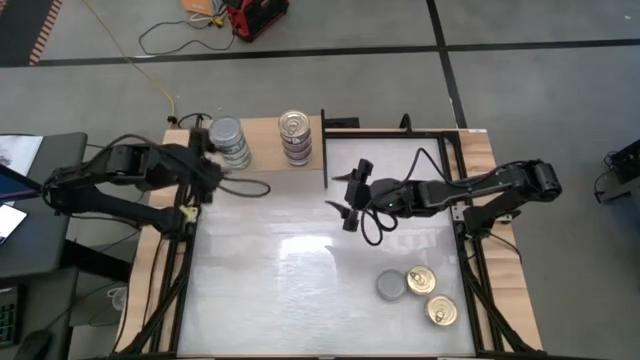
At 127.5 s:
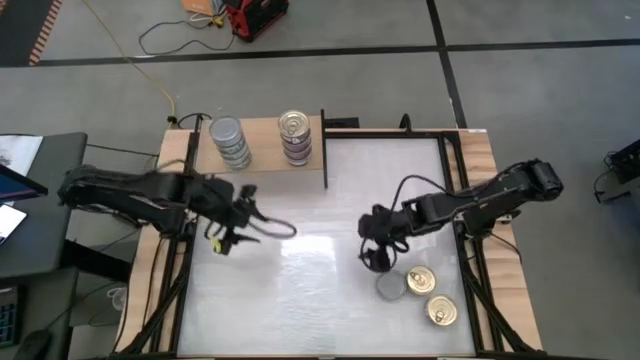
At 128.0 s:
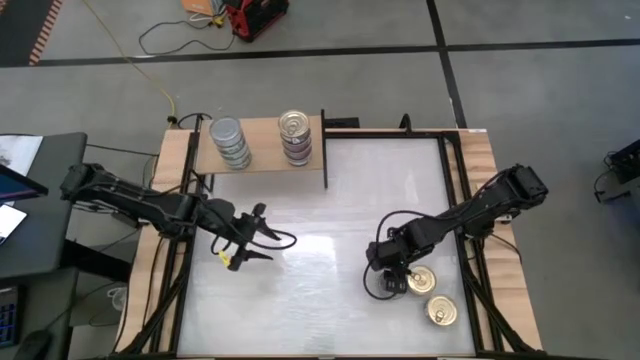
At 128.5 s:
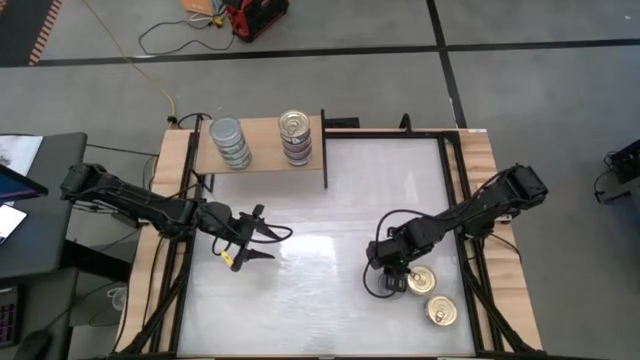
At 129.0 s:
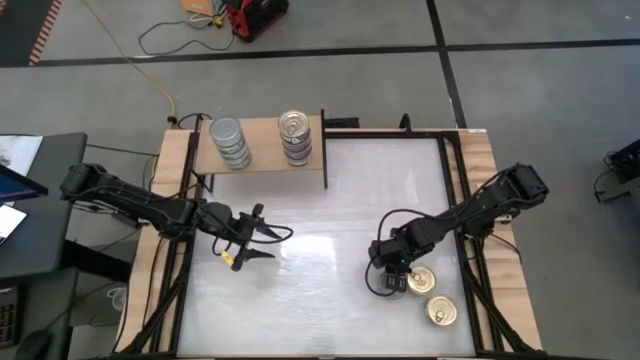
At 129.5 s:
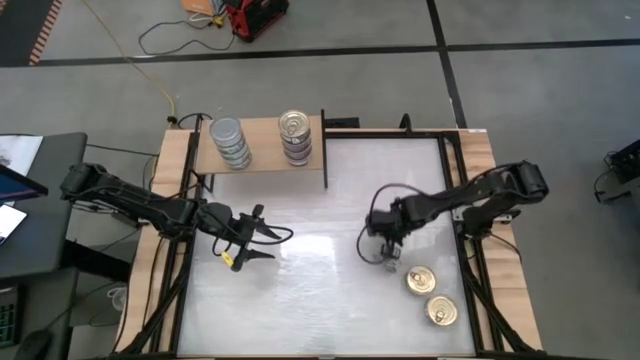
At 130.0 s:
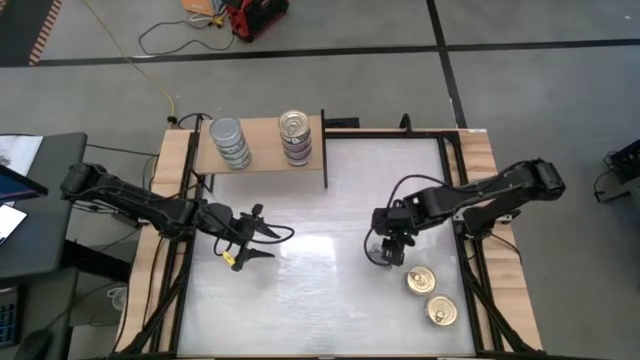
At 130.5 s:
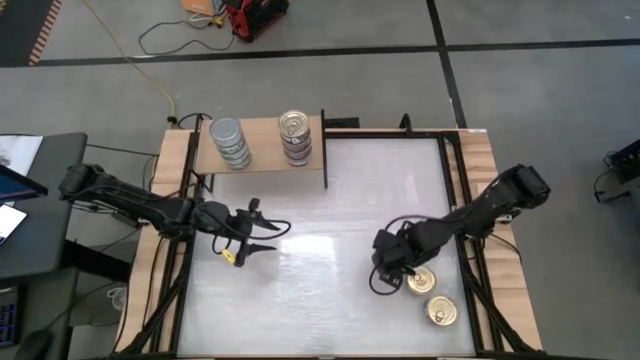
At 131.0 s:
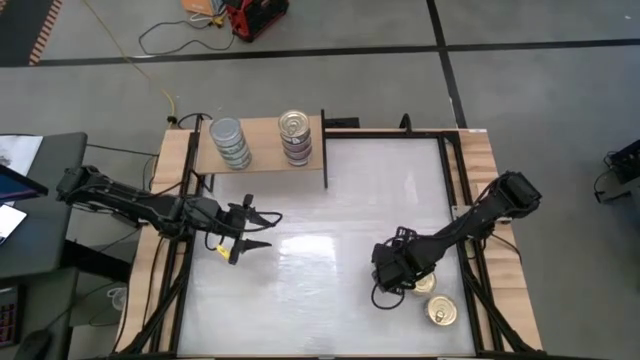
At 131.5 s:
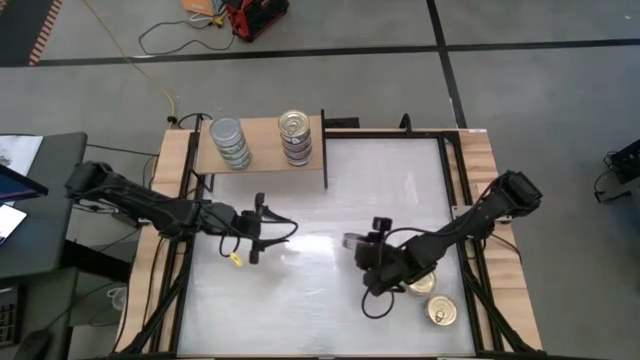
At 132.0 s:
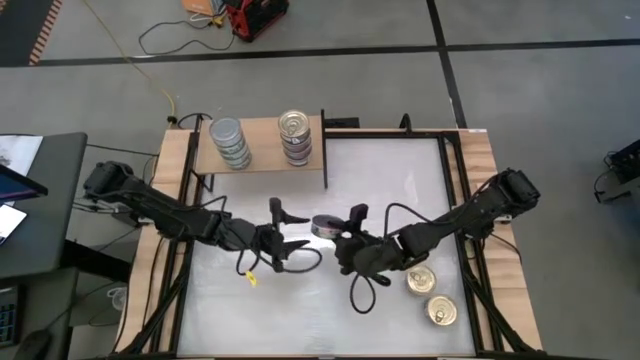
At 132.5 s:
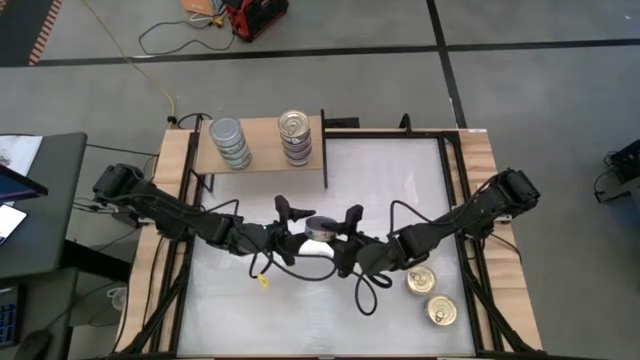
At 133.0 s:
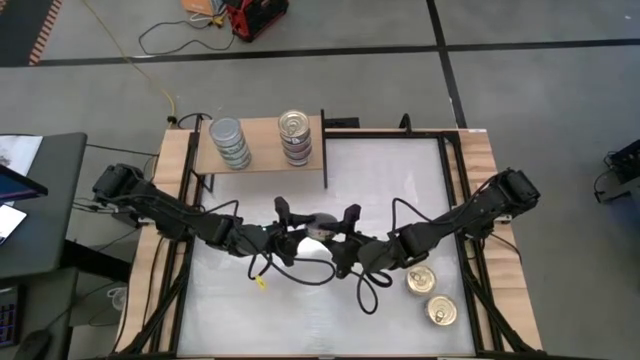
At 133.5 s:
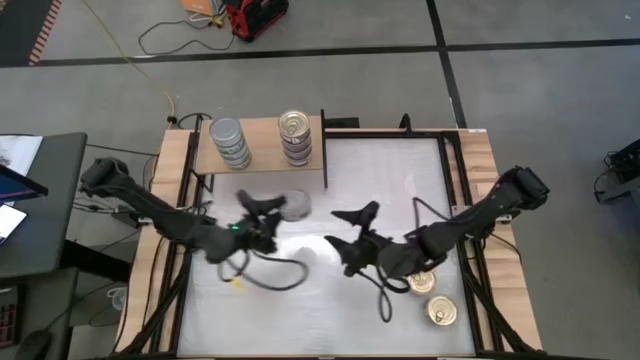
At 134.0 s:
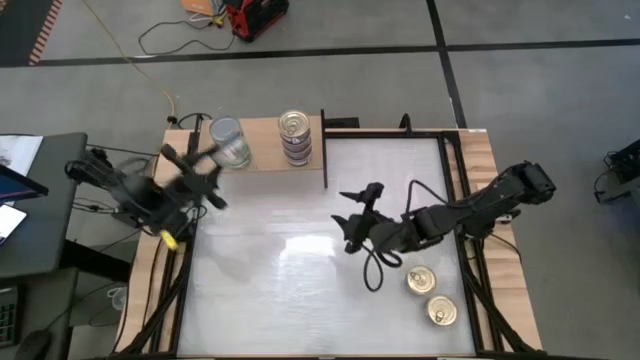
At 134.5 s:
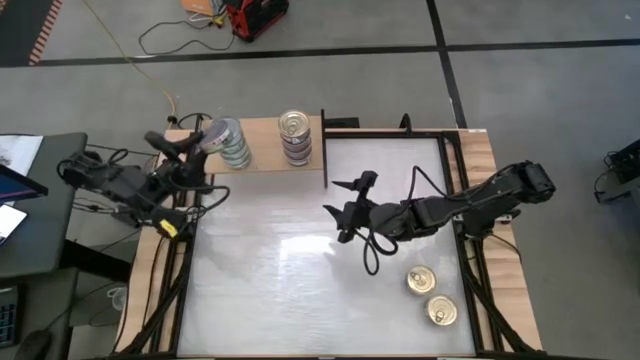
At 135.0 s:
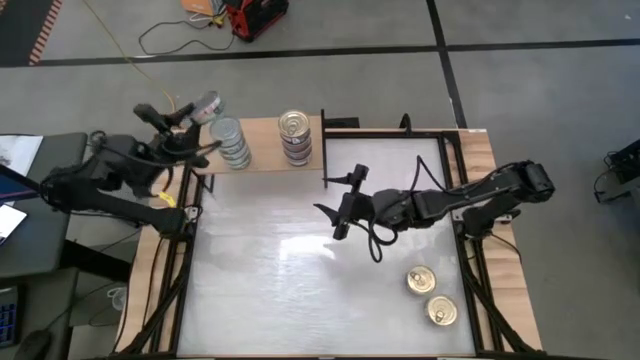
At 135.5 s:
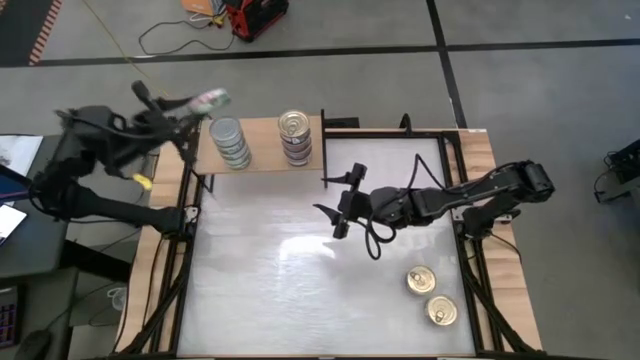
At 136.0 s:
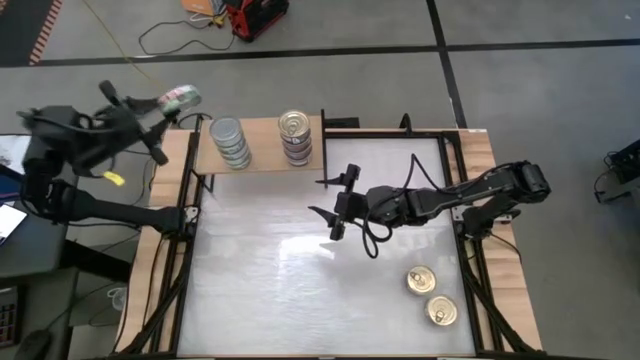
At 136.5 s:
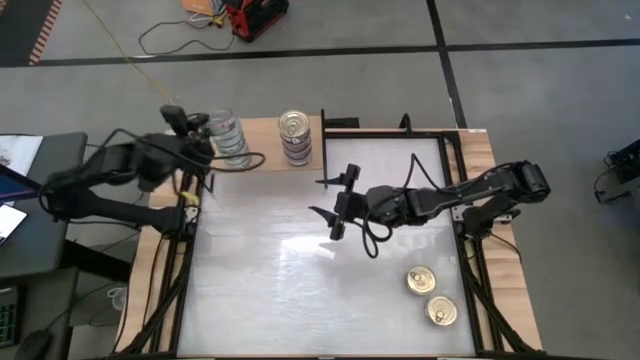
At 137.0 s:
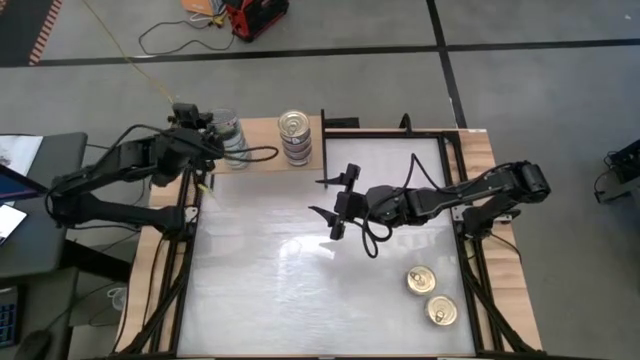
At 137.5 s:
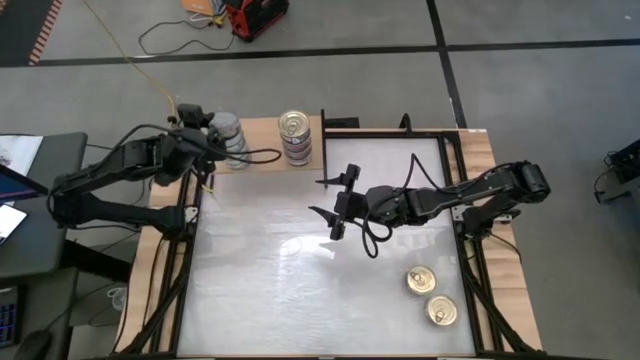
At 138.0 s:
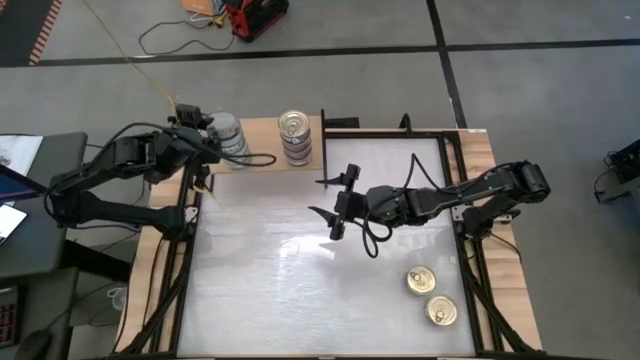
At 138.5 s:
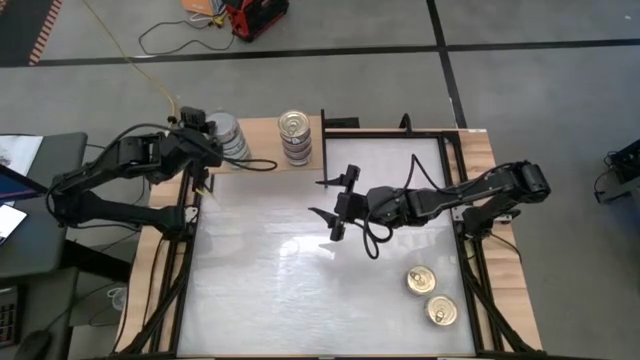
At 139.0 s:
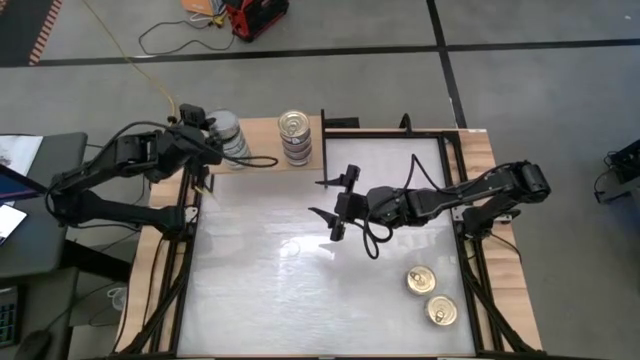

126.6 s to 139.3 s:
Task: Stack canned seafood by type on shelf
Stack the green-white tuna can on top of the other green-white tuna cans on the shelf

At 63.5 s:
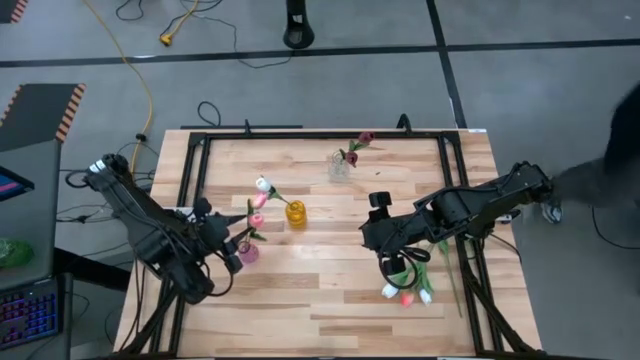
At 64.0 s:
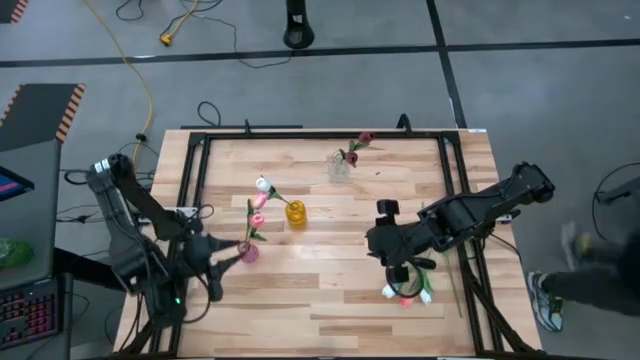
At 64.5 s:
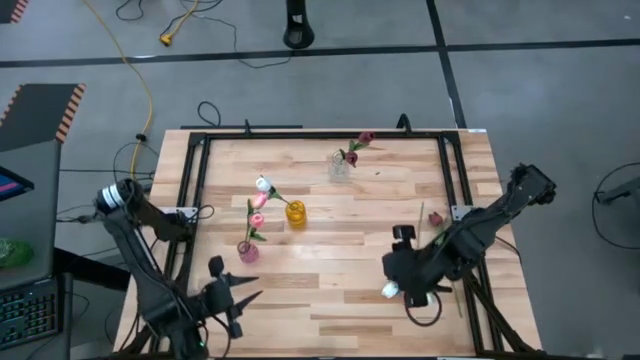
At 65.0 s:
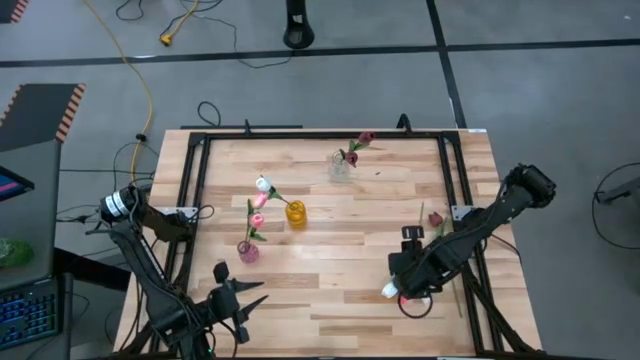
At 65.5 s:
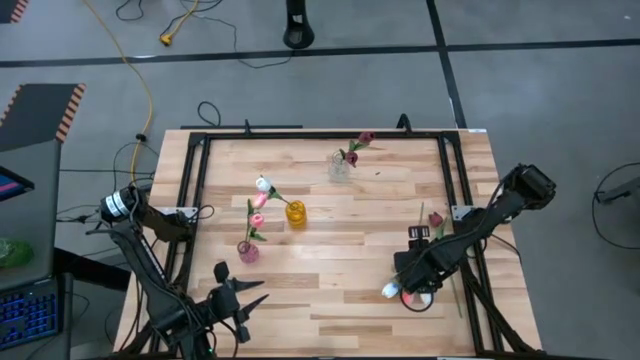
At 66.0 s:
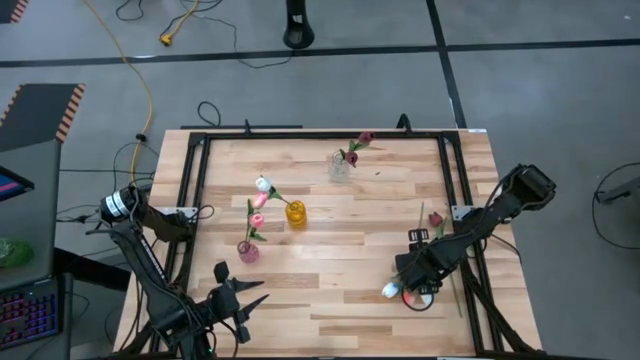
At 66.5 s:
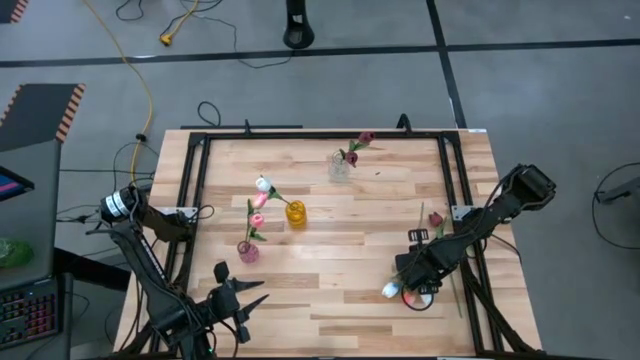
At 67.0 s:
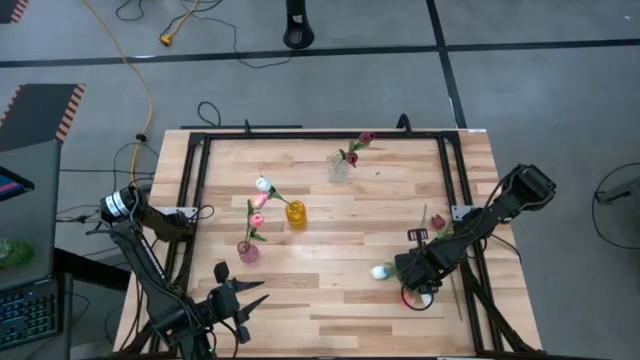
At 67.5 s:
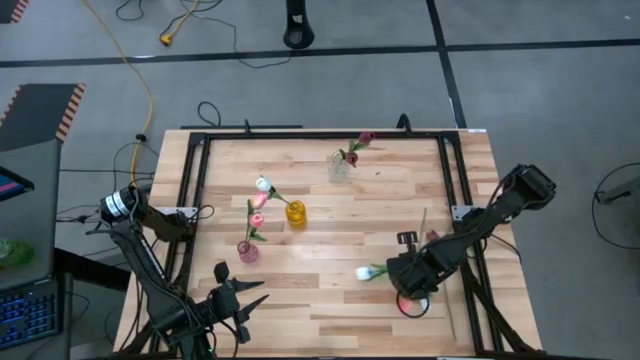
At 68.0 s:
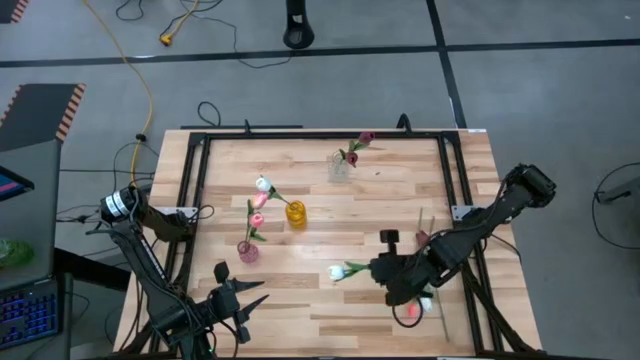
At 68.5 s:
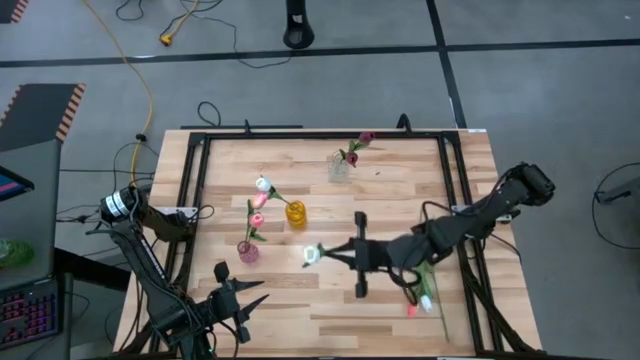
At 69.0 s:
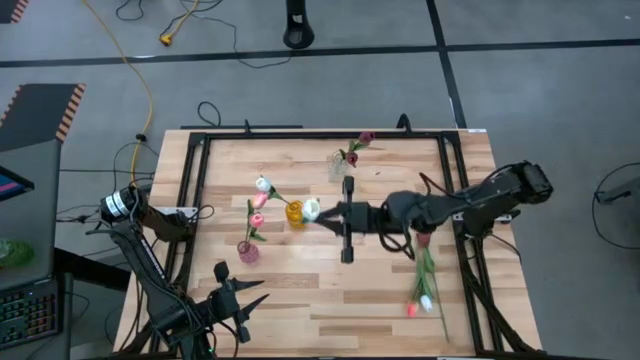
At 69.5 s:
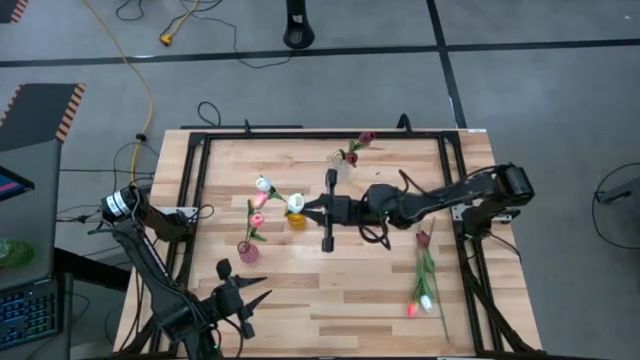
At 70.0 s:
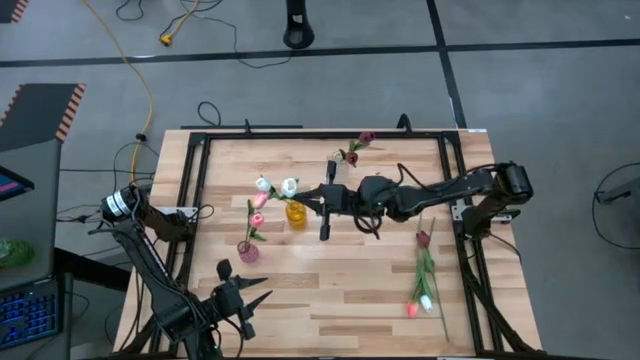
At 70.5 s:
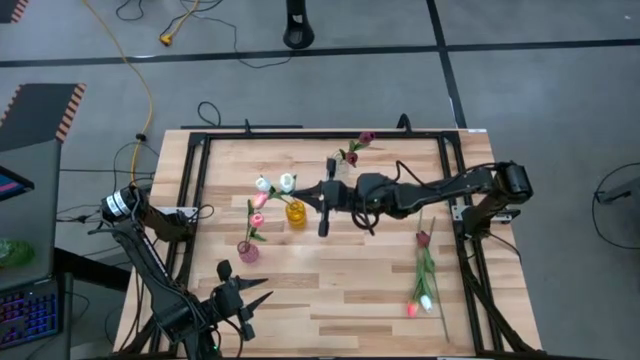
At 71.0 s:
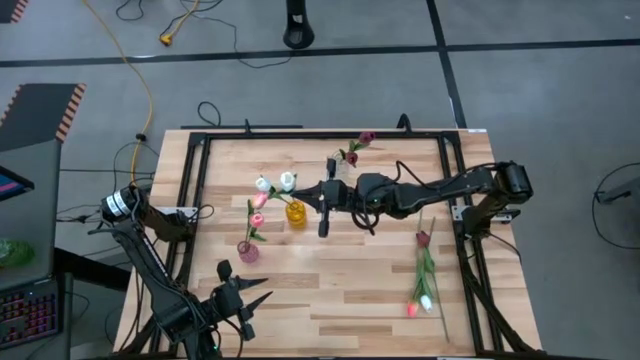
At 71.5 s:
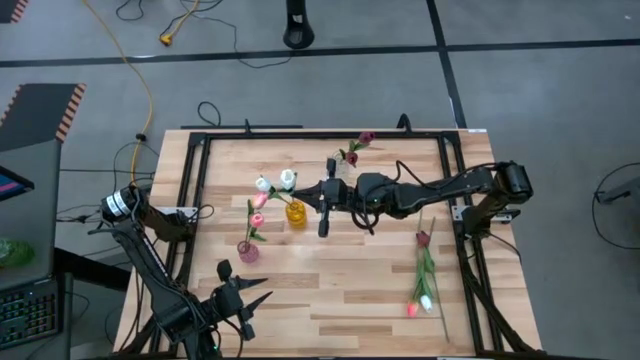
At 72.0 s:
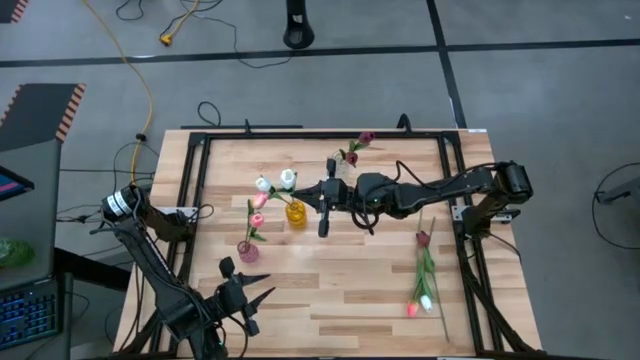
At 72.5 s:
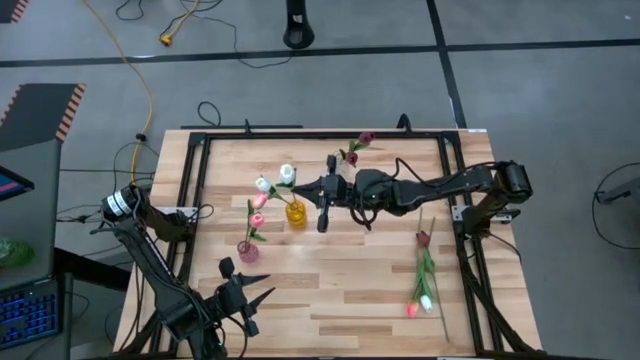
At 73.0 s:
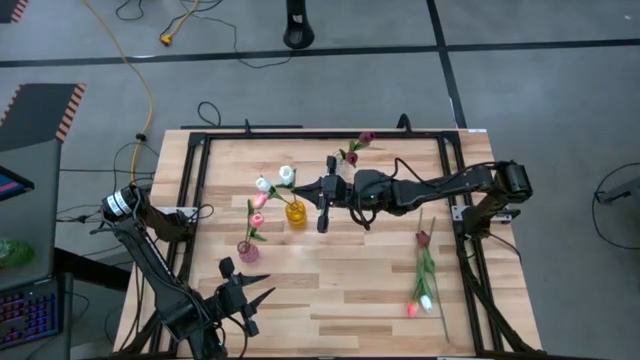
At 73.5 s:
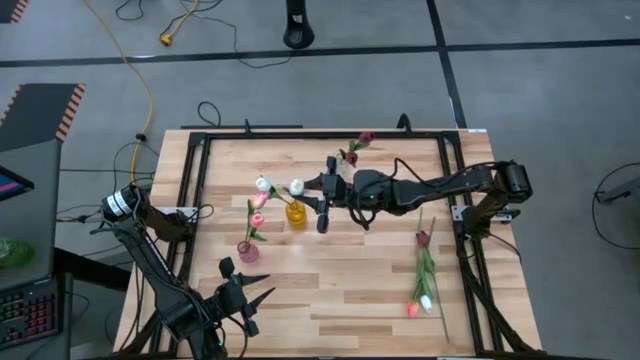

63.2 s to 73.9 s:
Task: Sort flowers into vase by color
Put the white flower into the yellow vase
